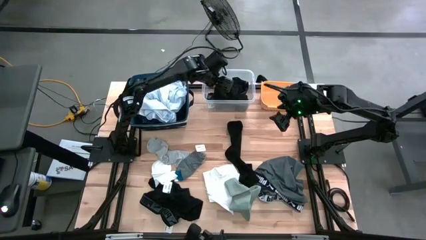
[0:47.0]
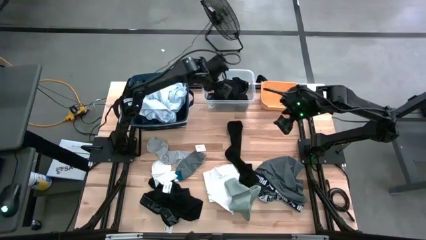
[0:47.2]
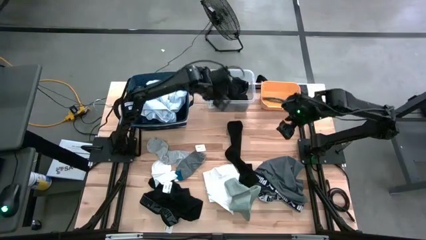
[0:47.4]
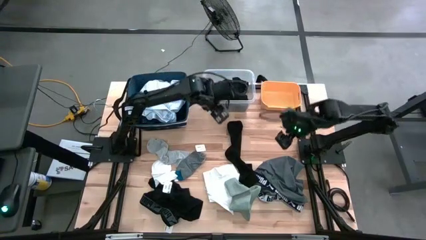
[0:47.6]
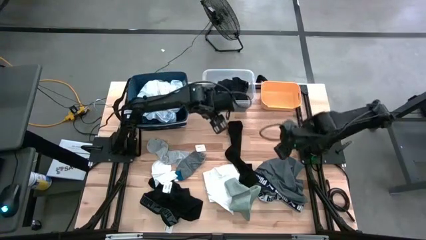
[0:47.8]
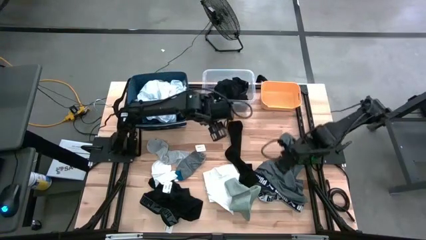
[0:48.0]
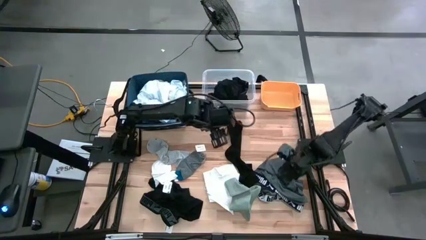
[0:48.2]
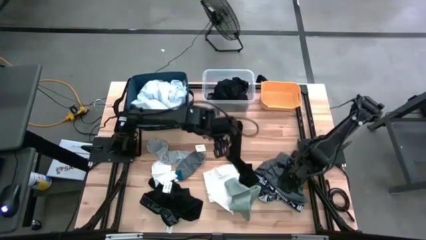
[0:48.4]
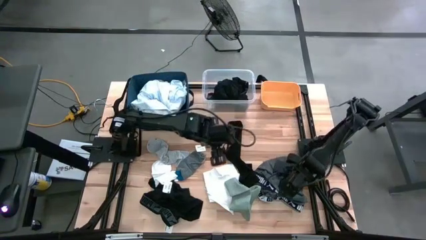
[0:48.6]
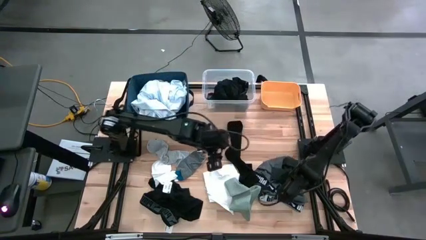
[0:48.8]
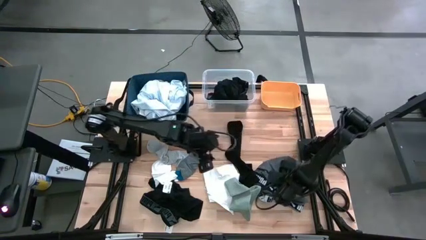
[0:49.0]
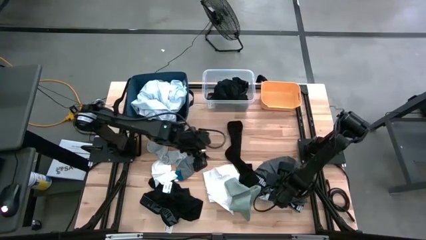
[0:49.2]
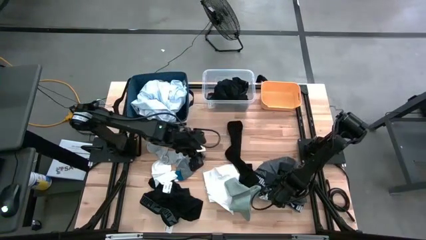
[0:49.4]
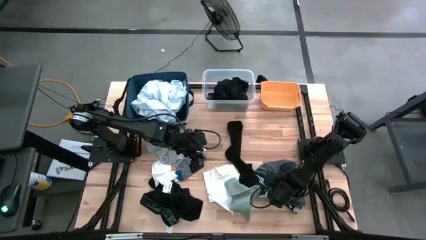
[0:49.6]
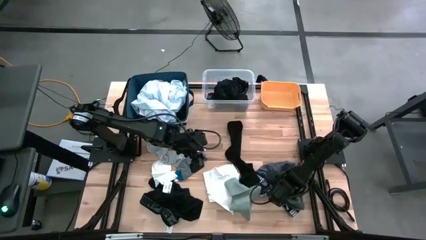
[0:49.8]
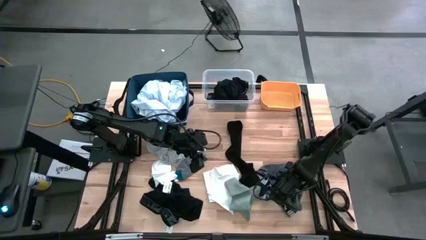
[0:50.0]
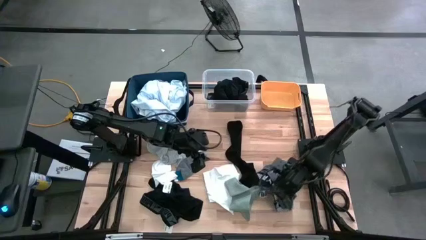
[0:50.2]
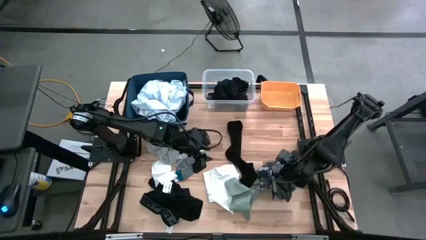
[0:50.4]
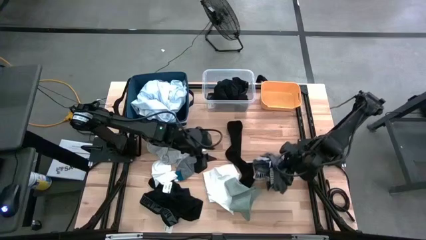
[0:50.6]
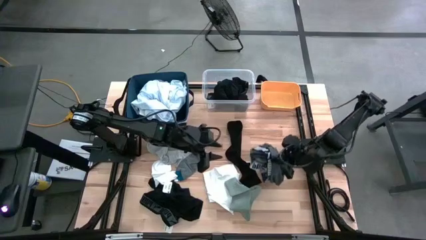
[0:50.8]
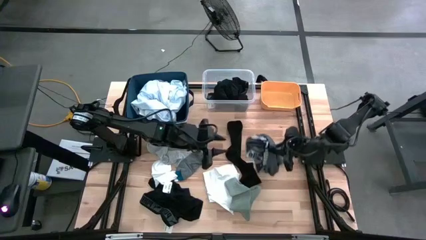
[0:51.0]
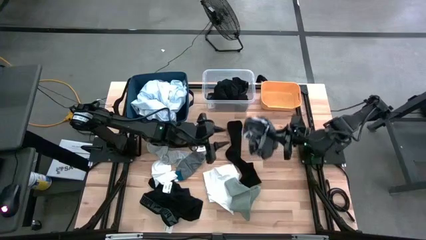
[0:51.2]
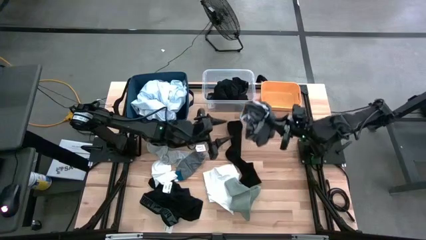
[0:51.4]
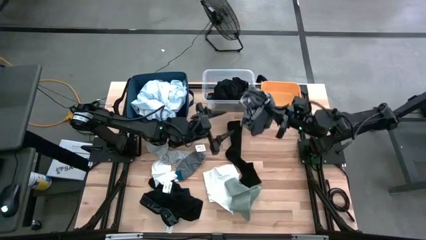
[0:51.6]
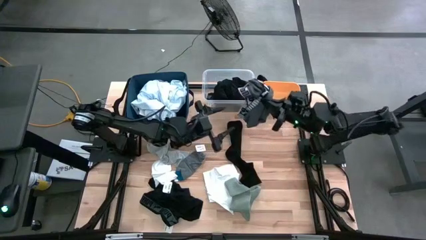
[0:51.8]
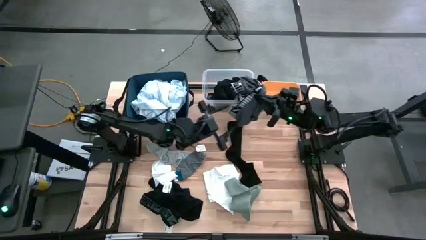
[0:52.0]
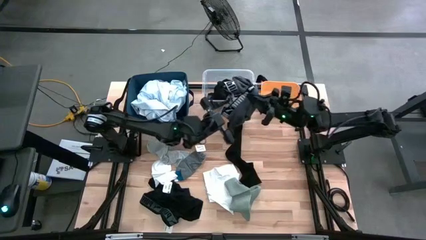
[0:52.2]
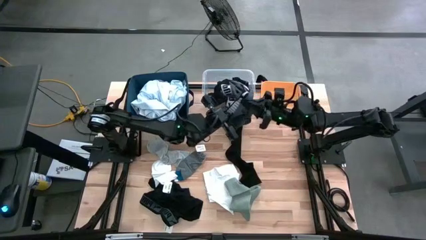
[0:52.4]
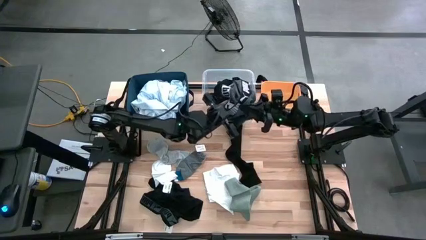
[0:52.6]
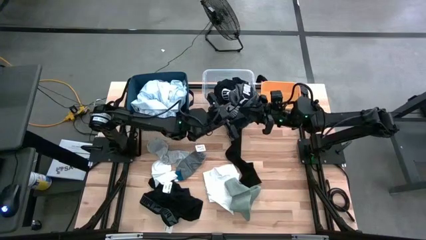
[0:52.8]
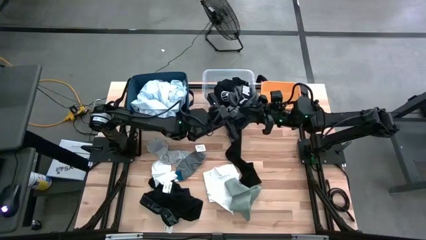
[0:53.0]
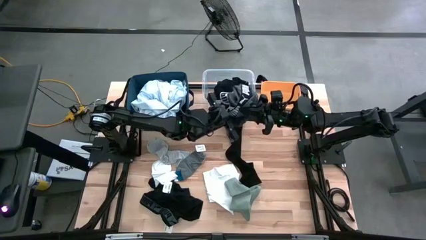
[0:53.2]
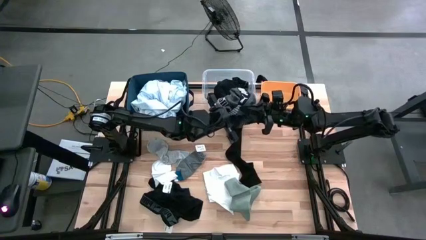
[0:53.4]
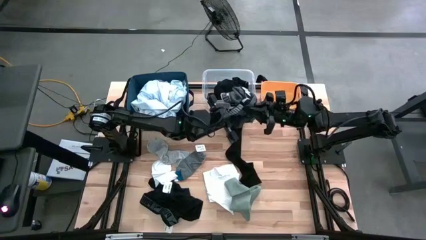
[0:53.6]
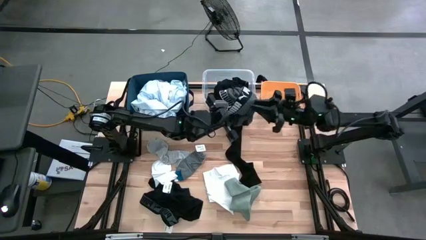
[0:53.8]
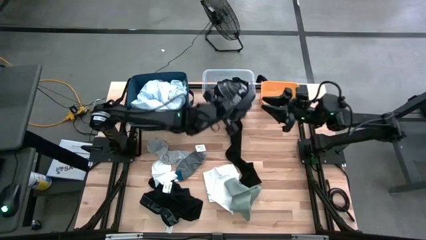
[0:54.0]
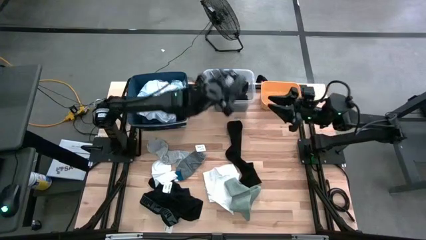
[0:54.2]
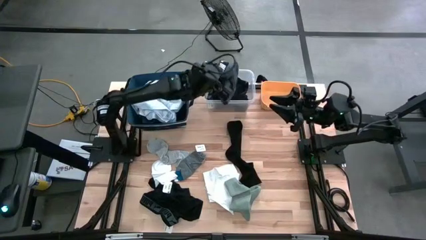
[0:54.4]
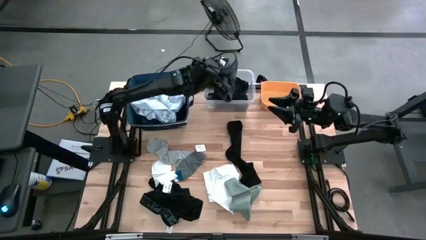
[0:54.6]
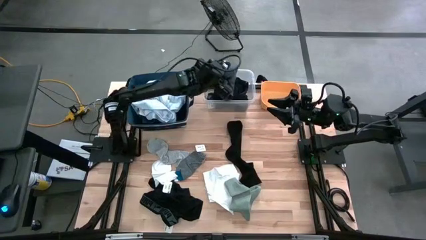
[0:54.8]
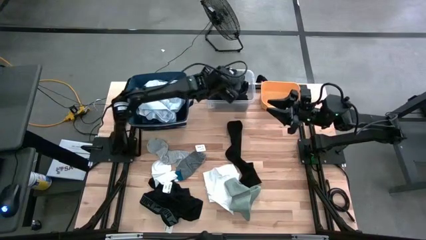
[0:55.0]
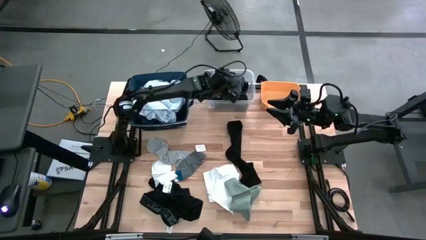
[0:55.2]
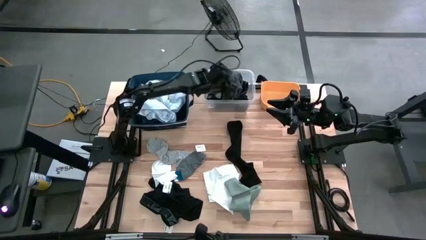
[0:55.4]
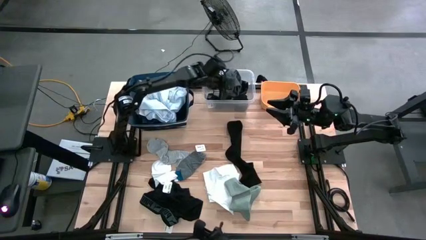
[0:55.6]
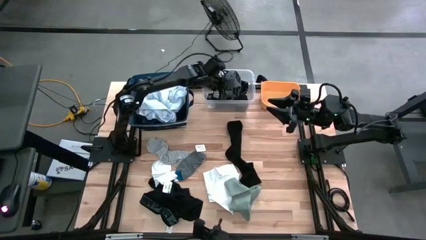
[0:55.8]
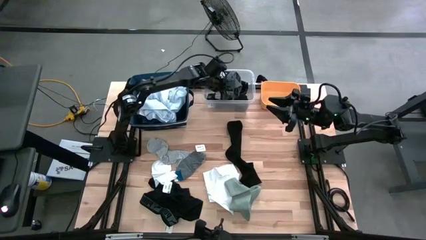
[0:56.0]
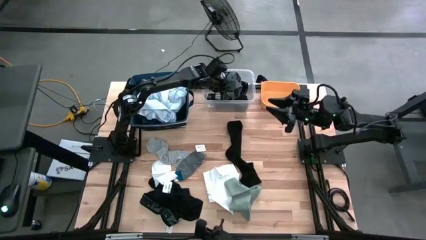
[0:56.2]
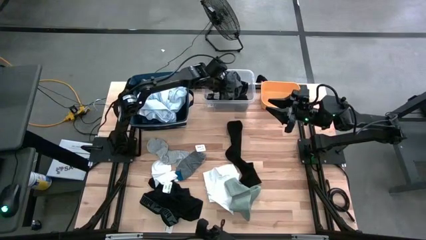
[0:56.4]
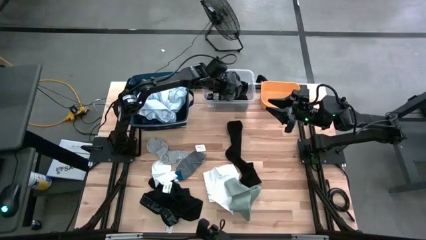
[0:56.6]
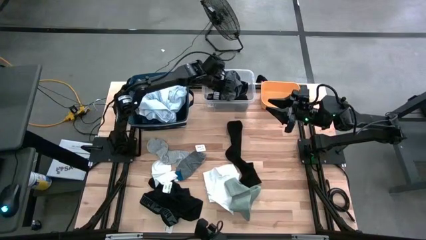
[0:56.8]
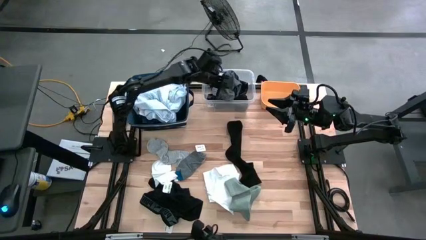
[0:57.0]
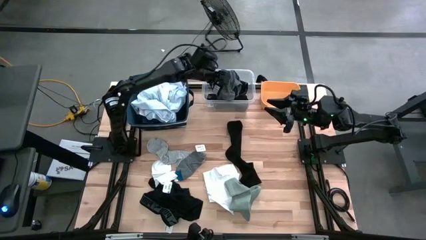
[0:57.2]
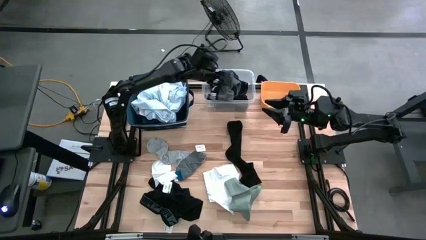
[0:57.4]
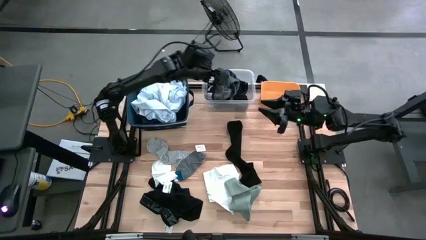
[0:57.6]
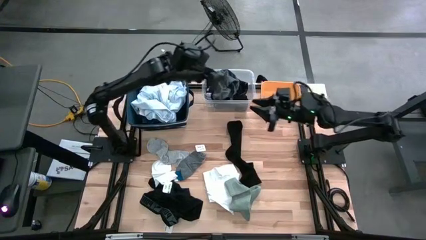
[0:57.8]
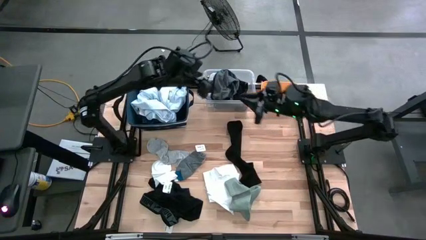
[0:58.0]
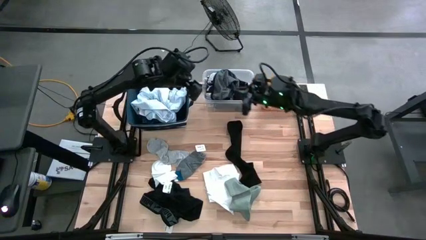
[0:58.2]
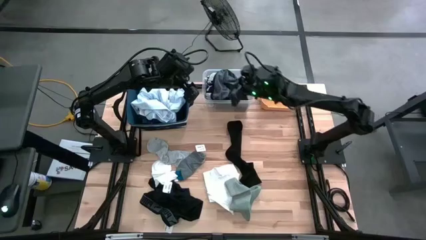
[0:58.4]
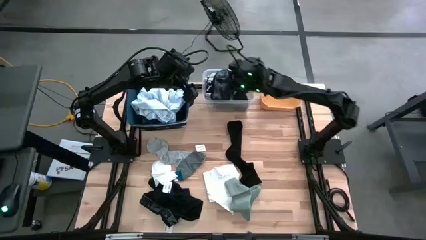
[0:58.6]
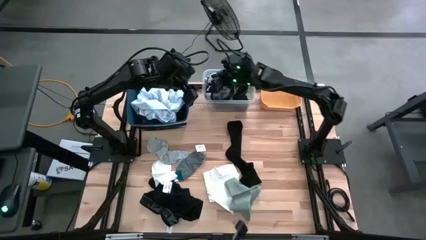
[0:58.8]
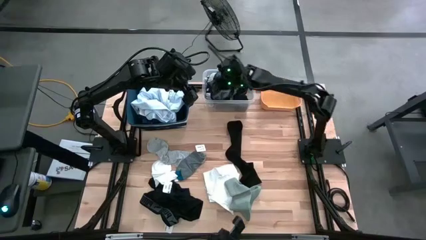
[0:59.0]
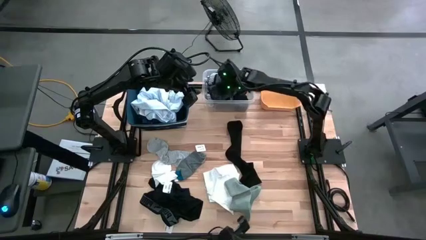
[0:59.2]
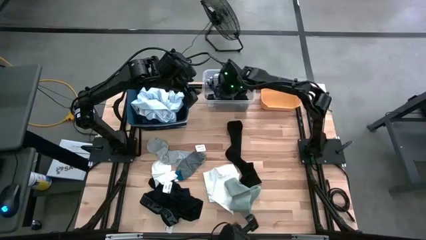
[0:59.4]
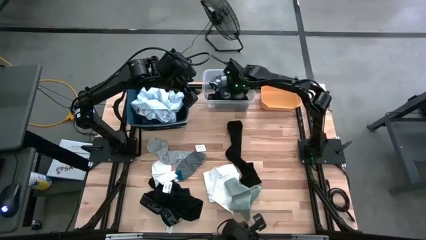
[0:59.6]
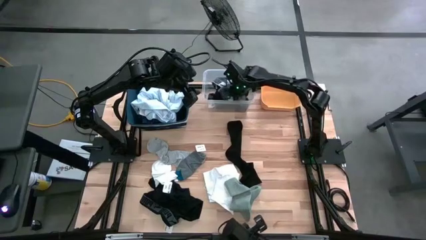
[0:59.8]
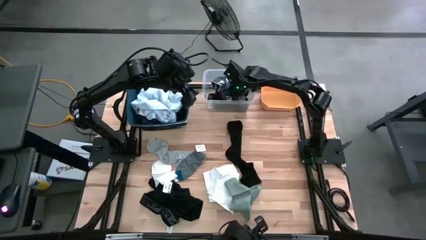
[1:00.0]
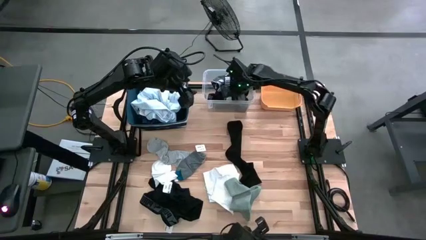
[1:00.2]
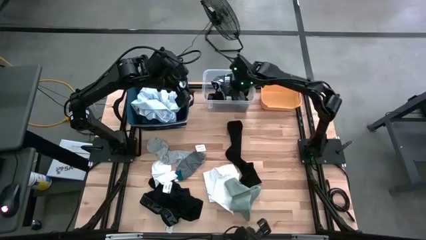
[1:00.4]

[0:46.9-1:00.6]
Task: Pick & Place Cloths
Put the gray boxer short into the transparent bin
